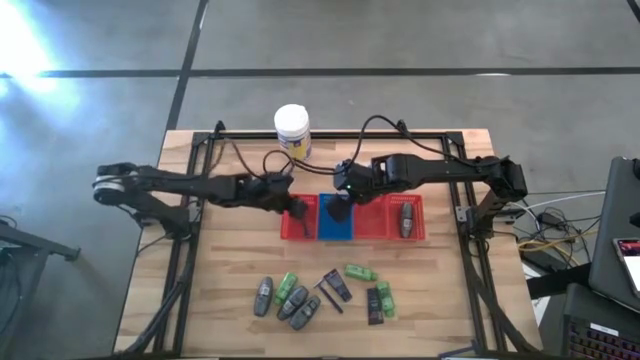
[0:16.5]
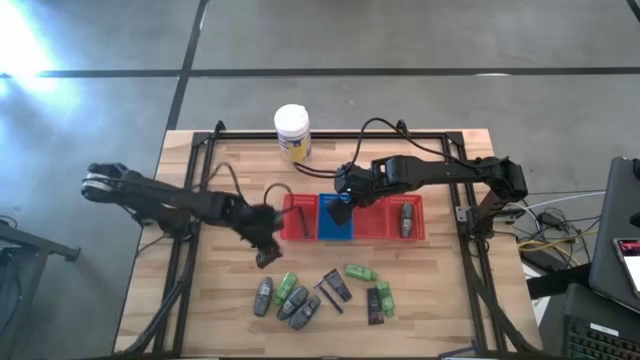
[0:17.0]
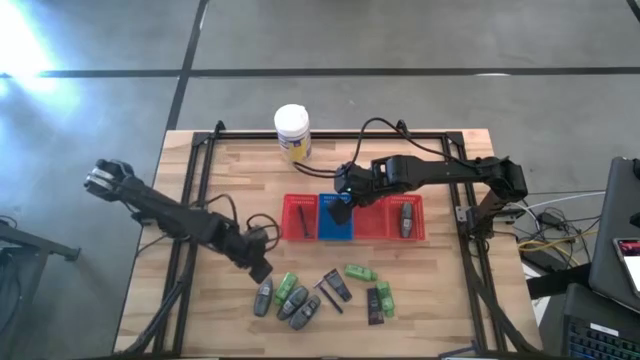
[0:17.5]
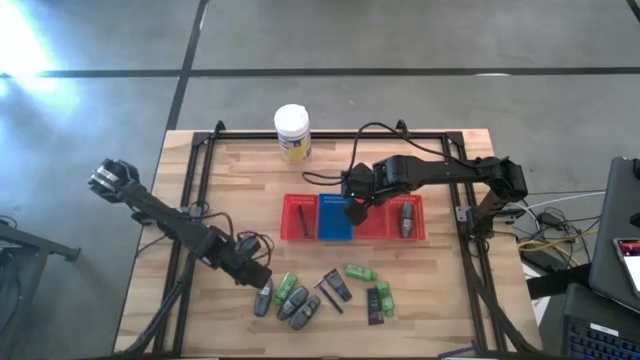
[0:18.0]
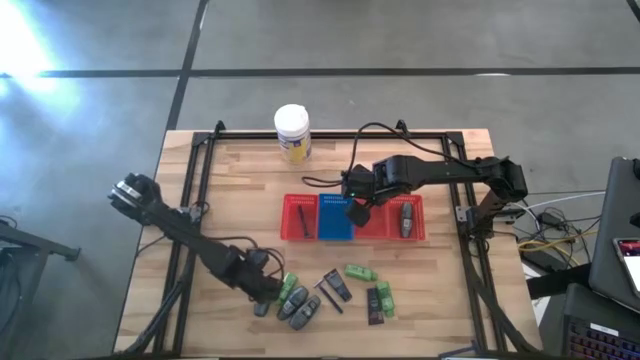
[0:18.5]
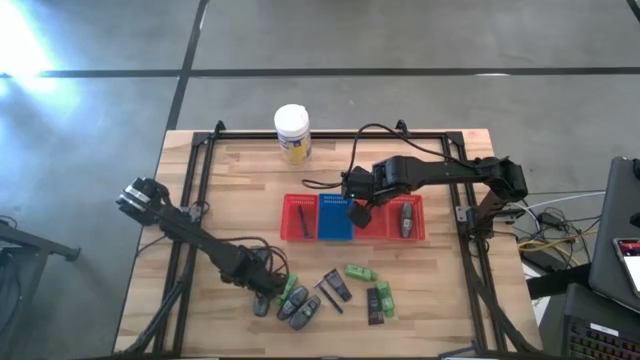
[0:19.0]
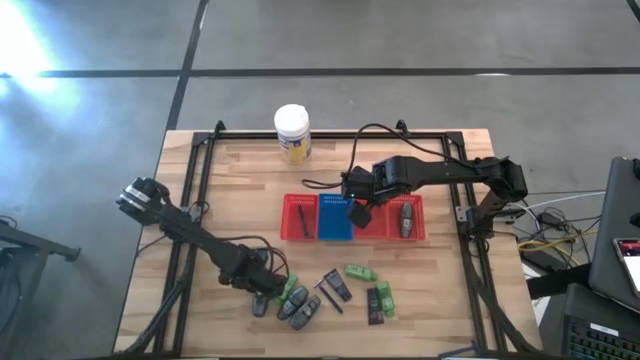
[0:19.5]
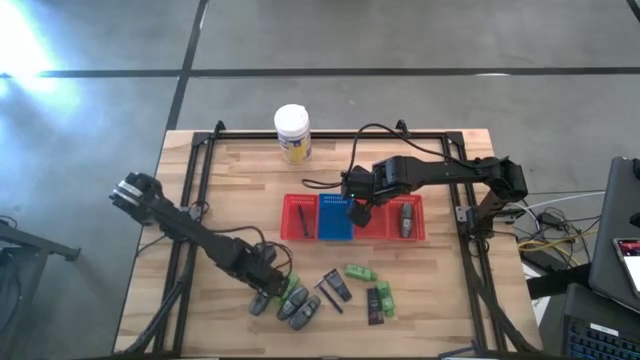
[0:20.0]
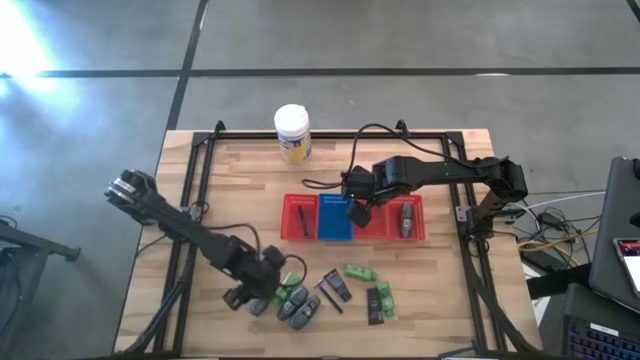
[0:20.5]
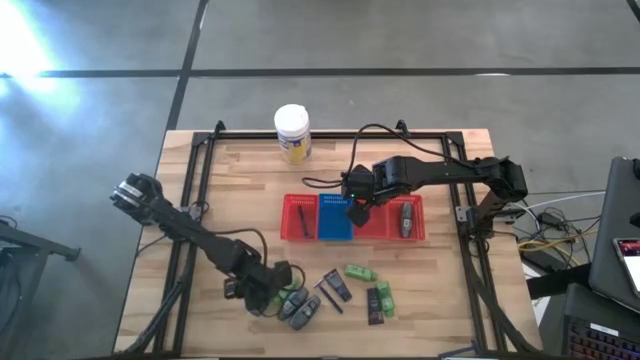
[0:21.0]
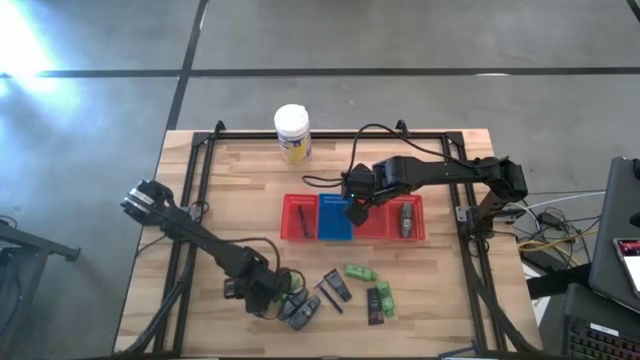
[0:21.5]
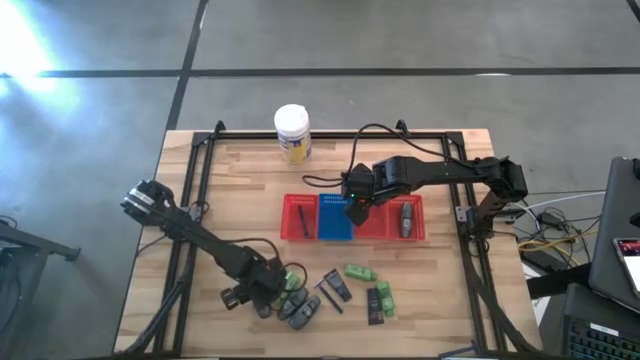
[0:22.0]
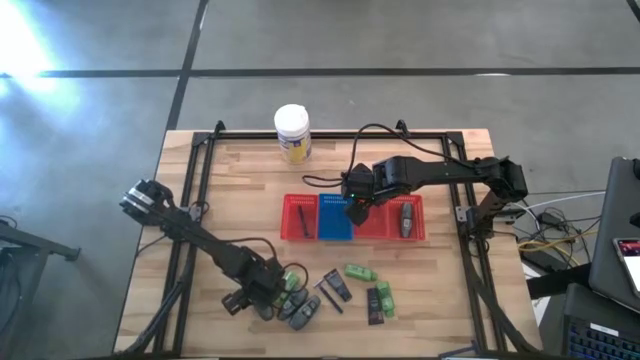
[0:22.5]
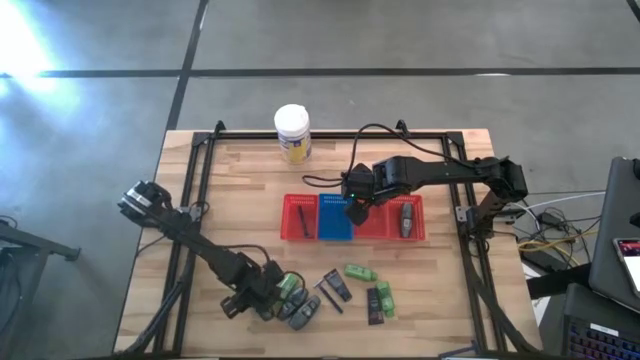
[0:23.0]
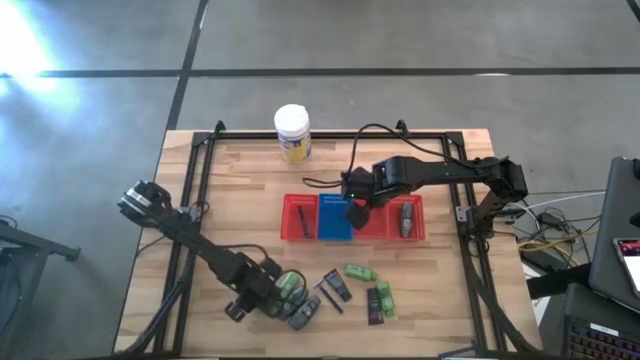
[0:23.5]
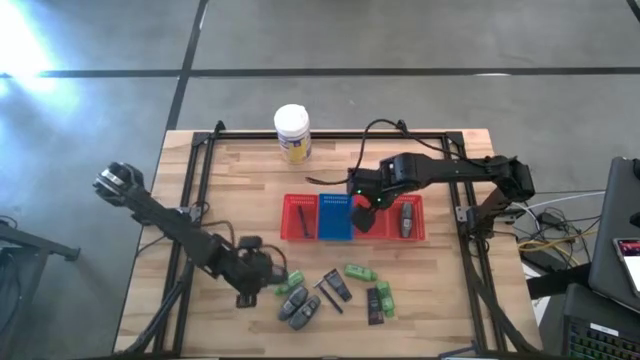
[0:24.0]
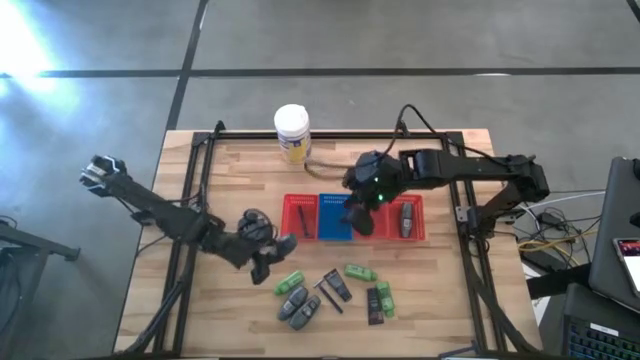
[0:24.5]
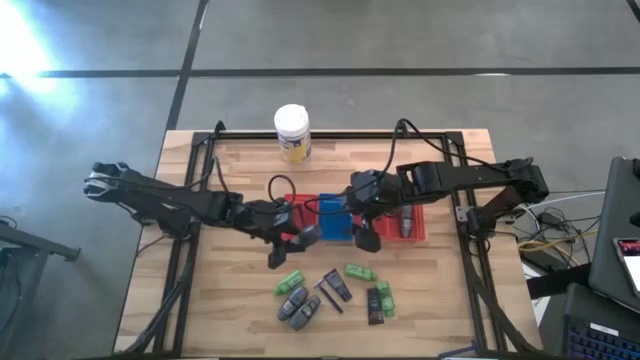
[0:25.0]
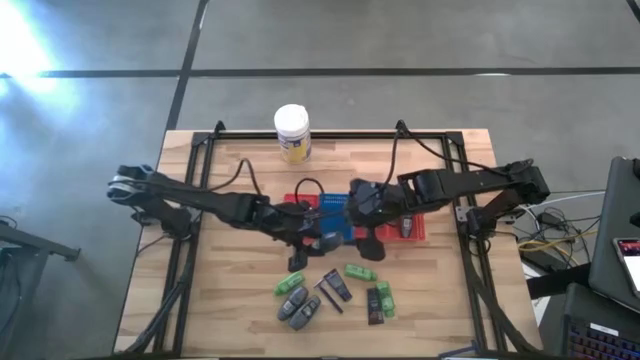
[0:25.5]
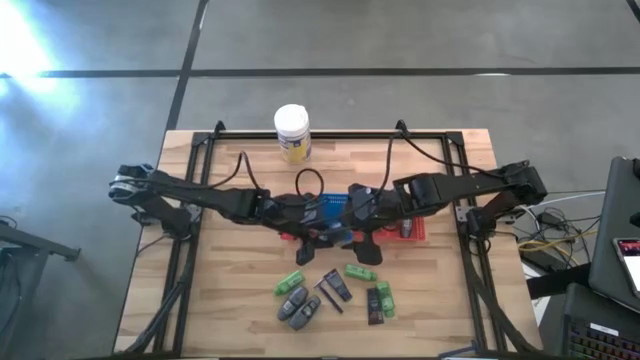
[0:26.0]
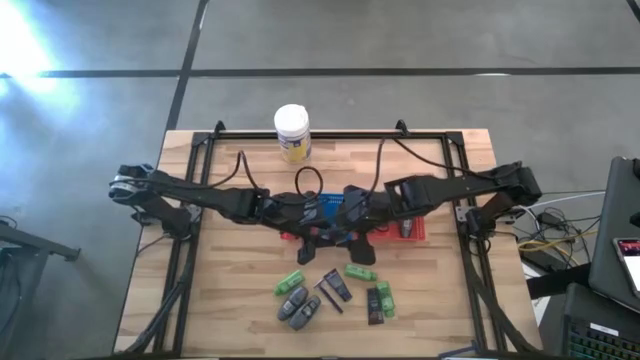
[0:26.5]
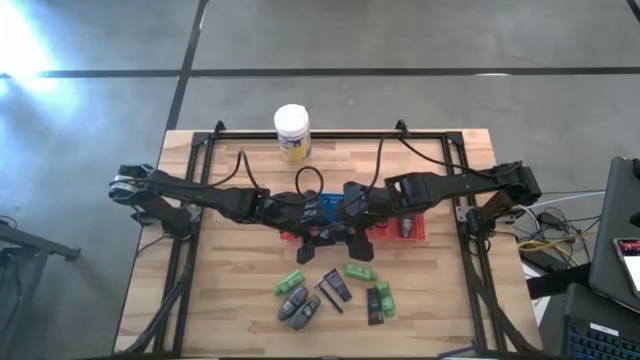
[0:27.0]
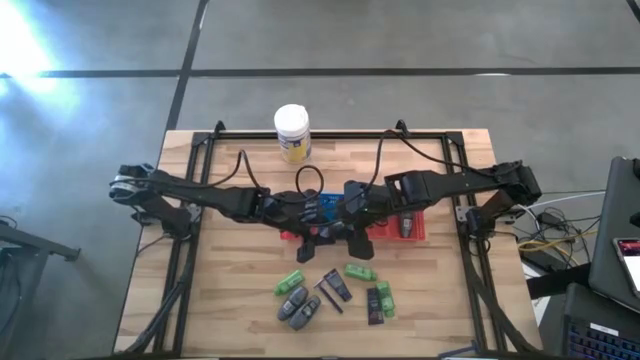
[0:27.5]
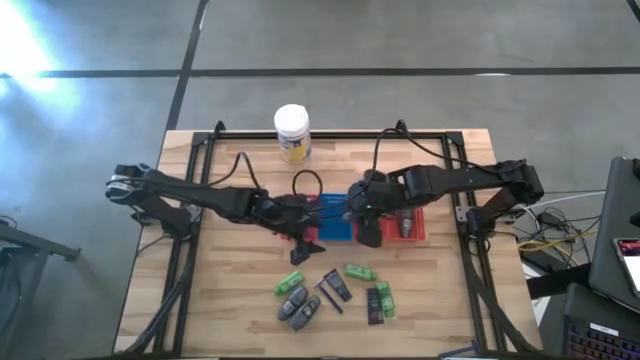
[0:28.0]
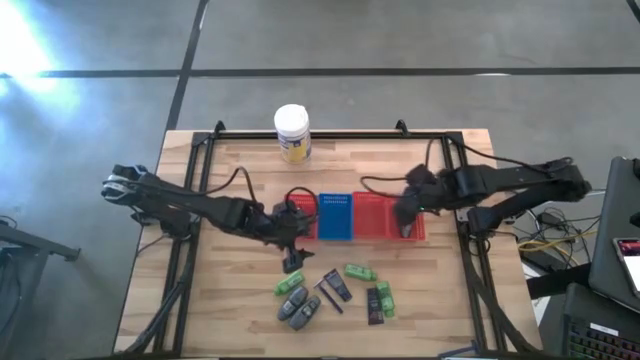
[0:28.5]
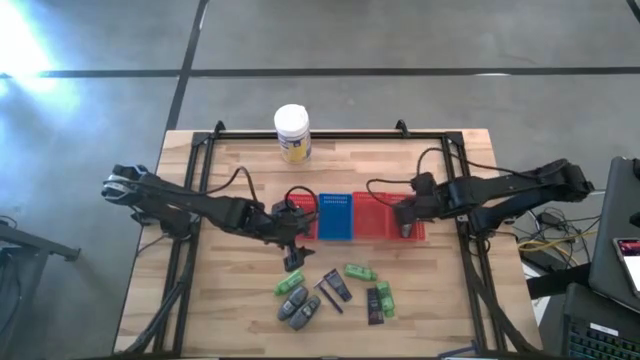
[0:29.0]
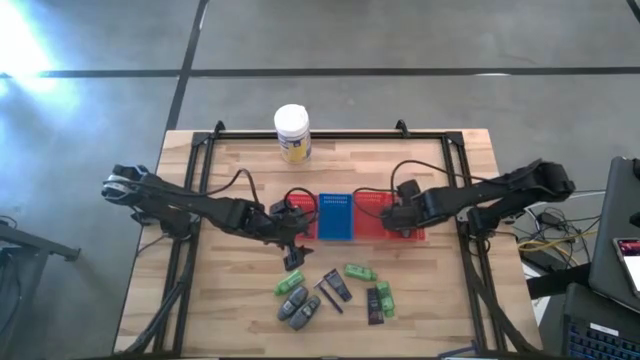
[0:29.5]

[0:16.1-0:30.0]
Task: Pick & Place Travel size toiletries
Put the gray deodorant into the right red bin

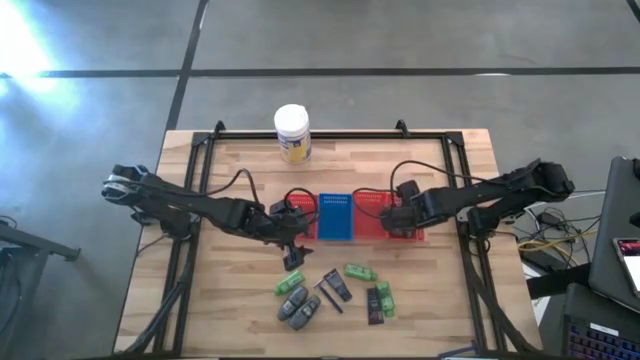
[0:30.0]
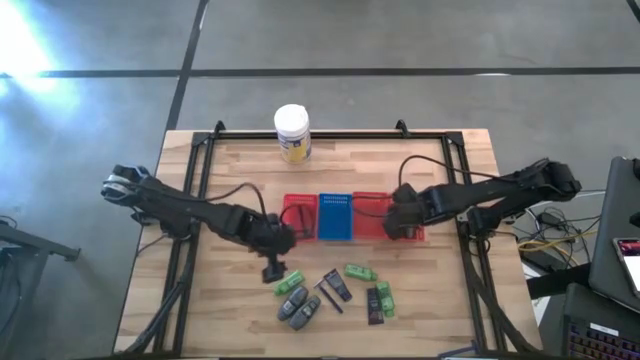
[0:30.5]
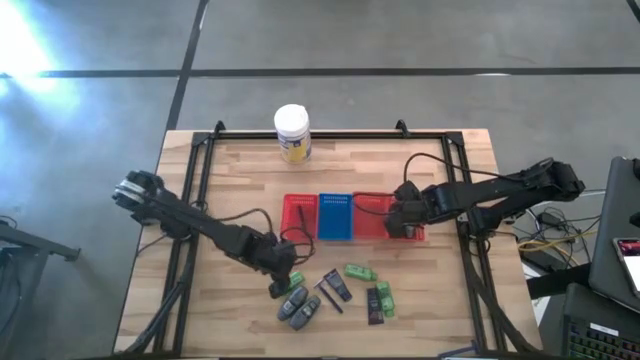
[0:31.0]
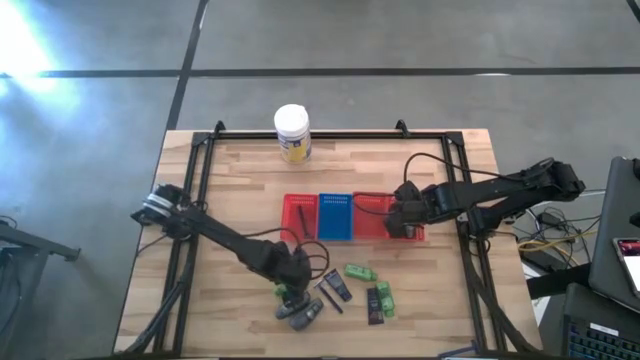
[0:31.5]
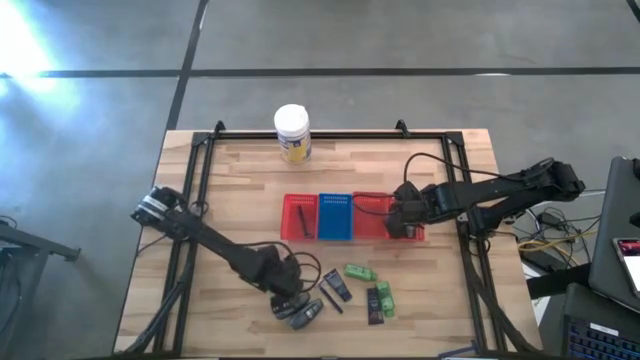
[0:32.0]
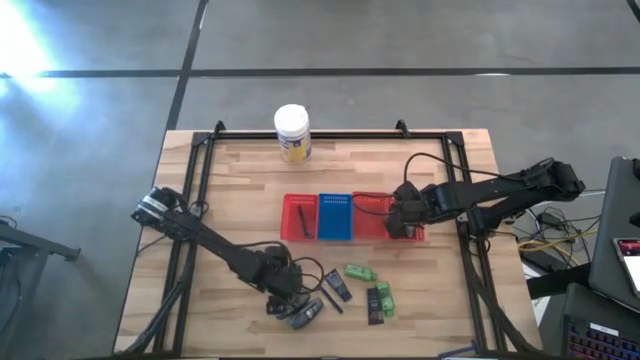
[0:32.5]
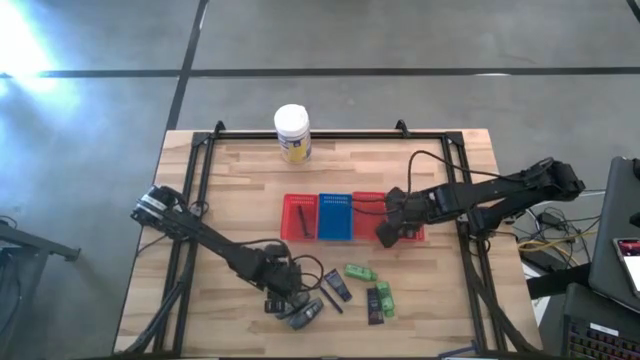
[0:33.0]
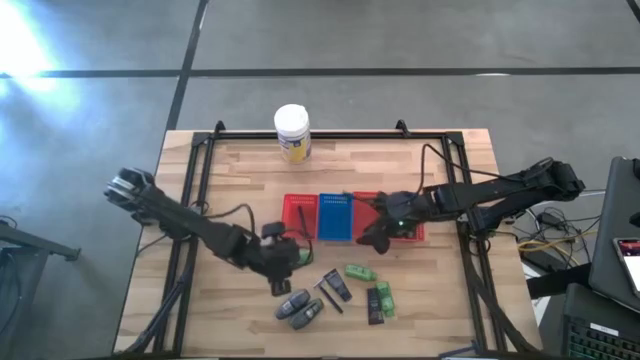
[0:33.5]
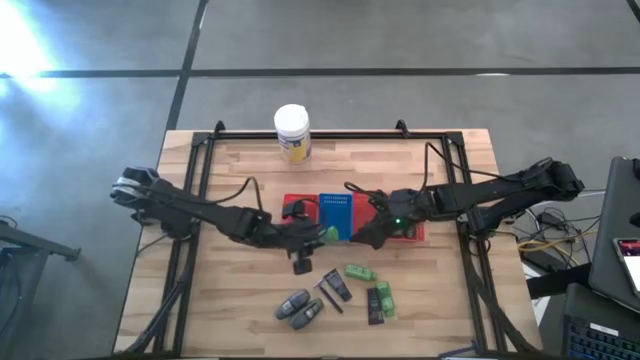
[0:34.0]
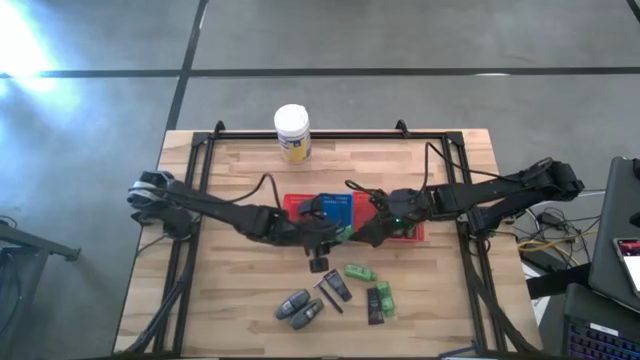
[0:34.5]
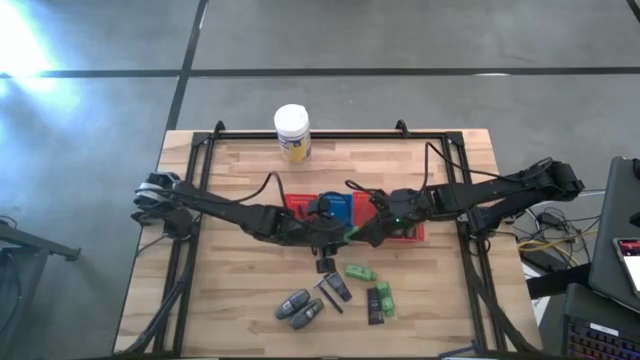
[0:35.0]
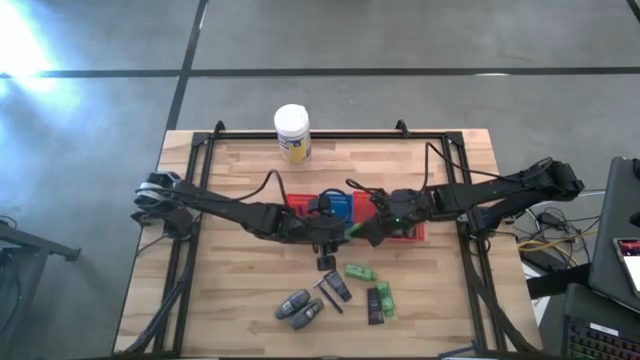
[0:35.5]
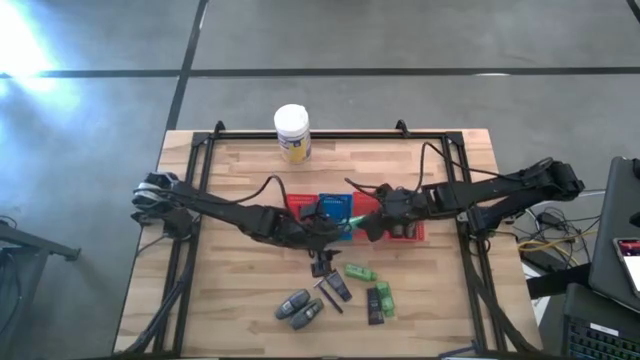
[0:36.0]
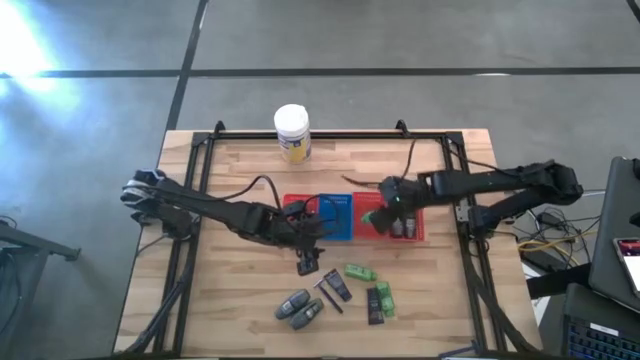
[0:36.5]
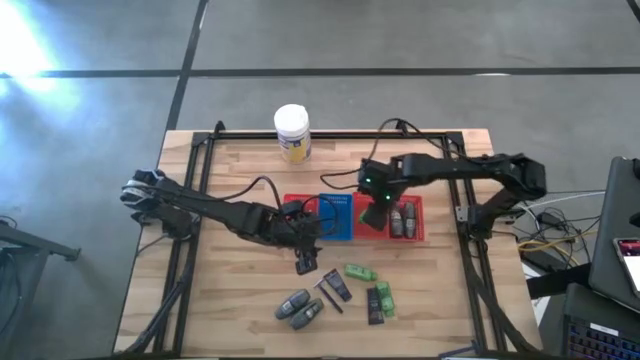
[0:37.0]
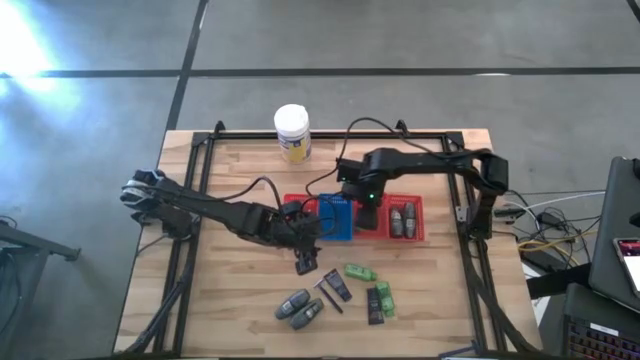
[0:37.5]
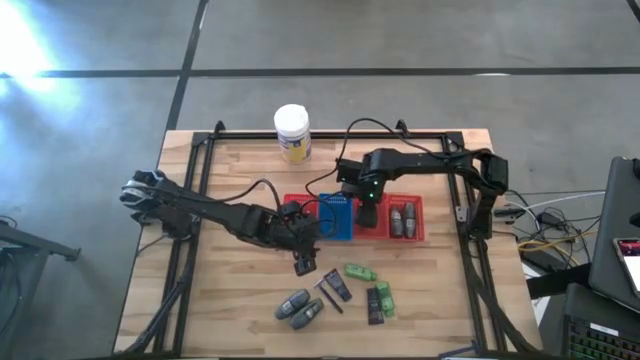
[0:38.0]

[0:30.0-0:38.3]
Put the green shampoo into the middle red bin
